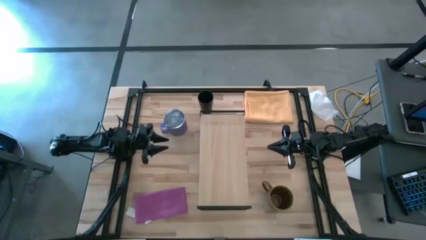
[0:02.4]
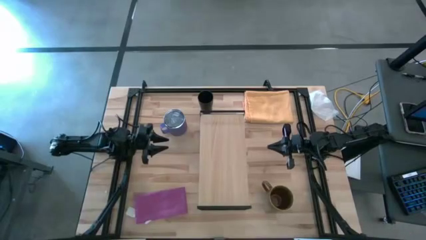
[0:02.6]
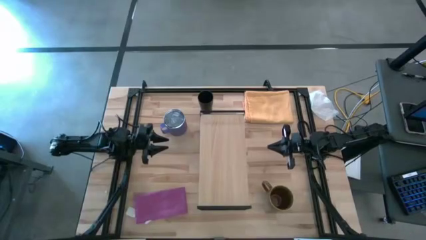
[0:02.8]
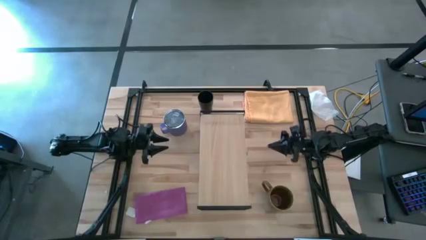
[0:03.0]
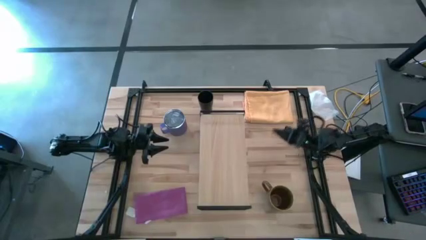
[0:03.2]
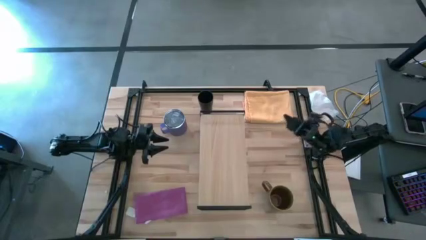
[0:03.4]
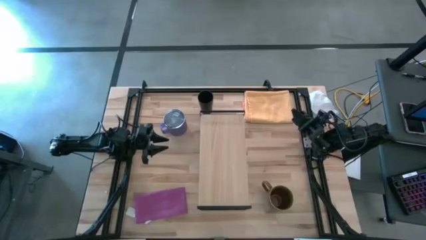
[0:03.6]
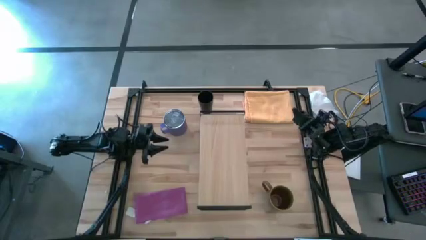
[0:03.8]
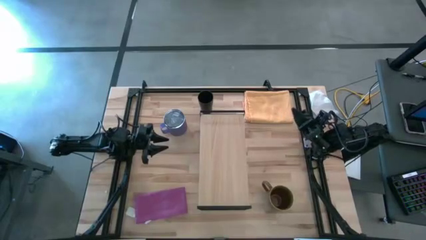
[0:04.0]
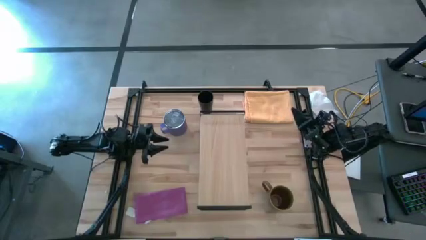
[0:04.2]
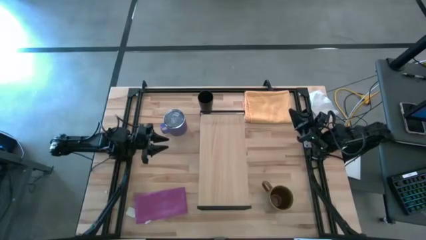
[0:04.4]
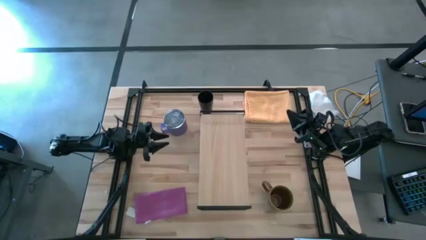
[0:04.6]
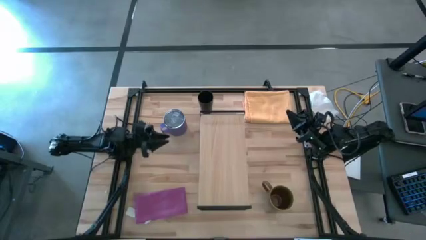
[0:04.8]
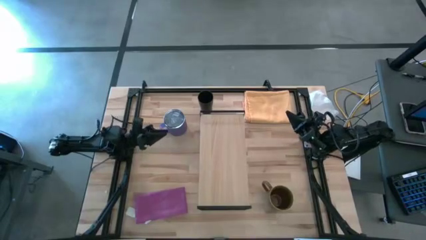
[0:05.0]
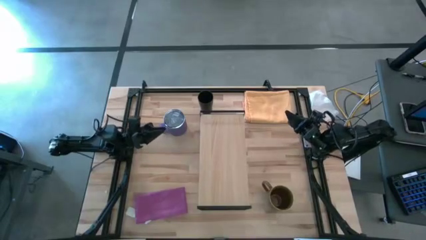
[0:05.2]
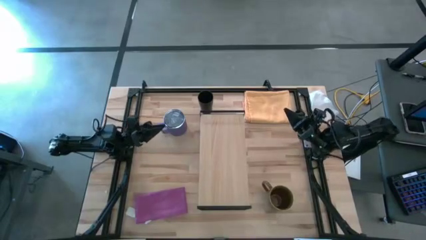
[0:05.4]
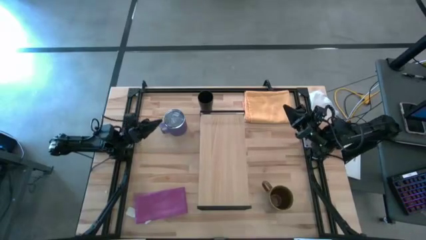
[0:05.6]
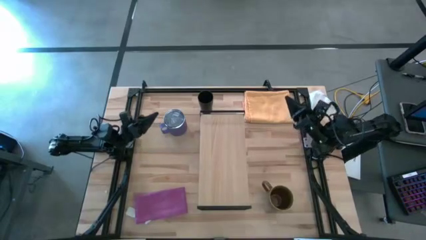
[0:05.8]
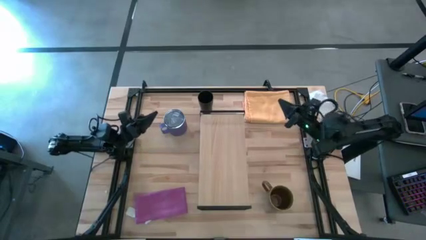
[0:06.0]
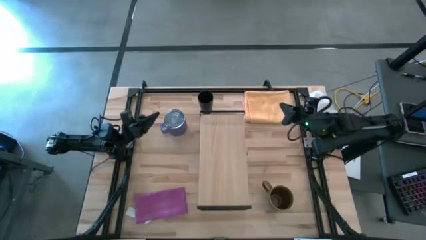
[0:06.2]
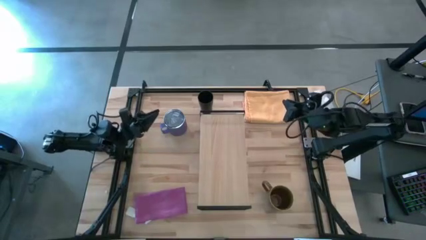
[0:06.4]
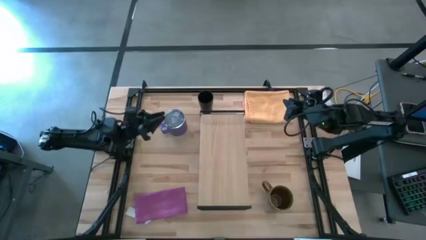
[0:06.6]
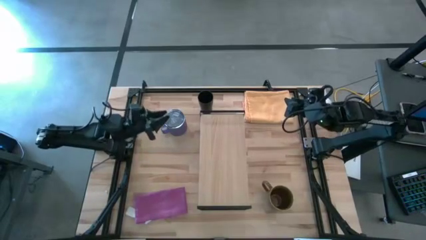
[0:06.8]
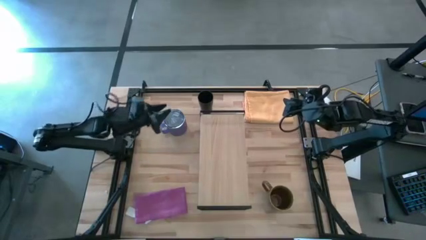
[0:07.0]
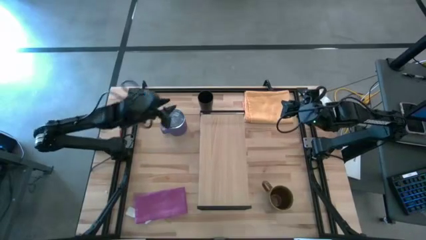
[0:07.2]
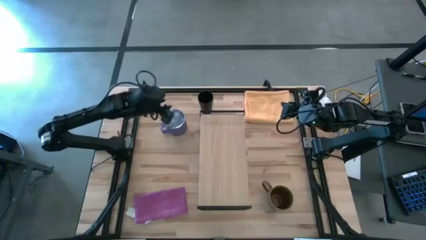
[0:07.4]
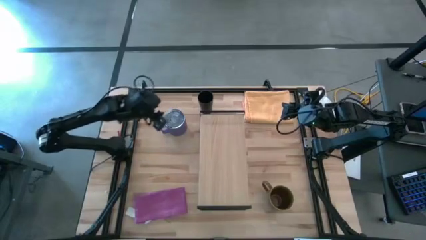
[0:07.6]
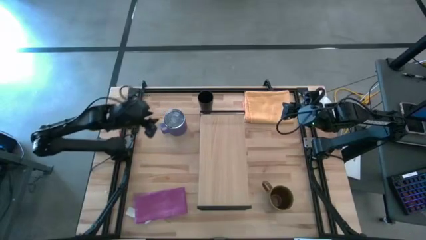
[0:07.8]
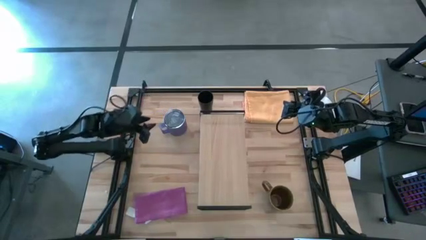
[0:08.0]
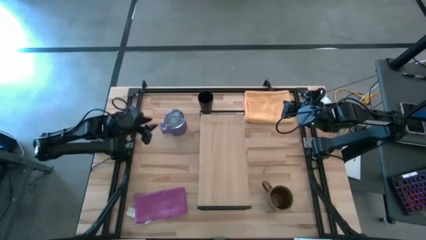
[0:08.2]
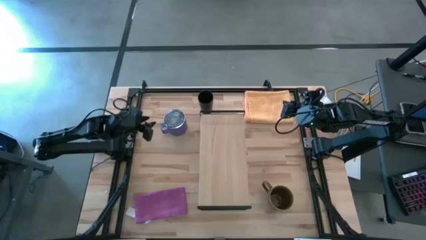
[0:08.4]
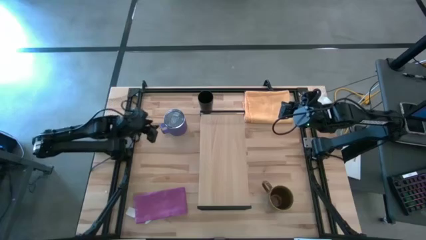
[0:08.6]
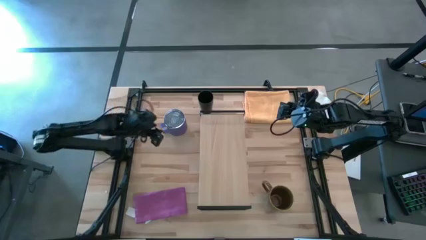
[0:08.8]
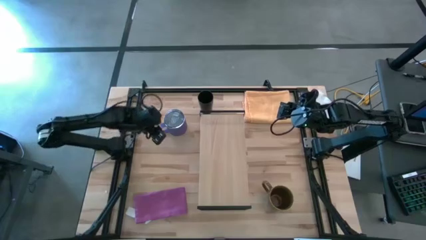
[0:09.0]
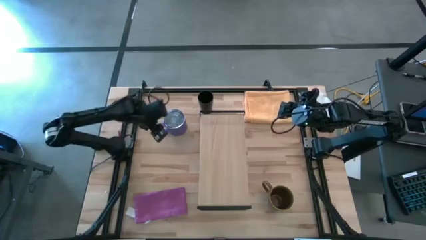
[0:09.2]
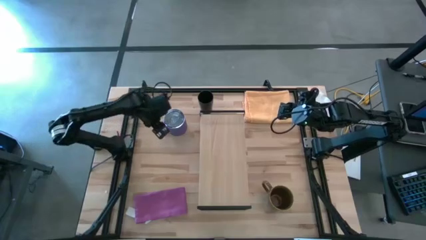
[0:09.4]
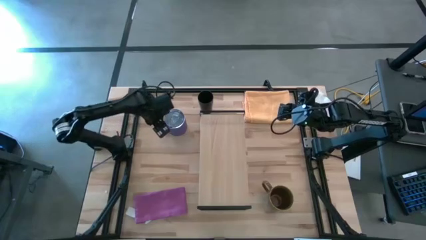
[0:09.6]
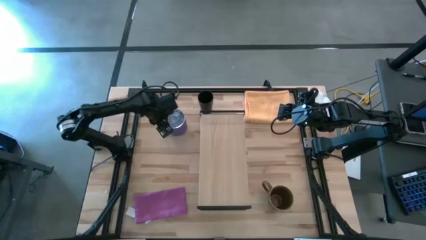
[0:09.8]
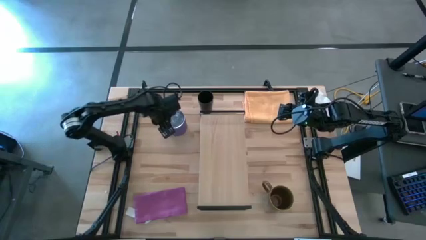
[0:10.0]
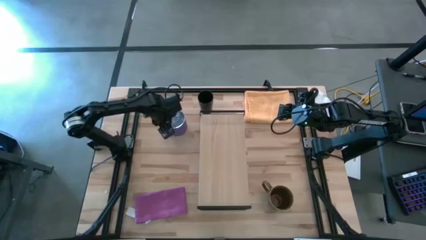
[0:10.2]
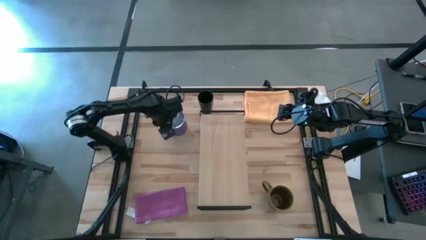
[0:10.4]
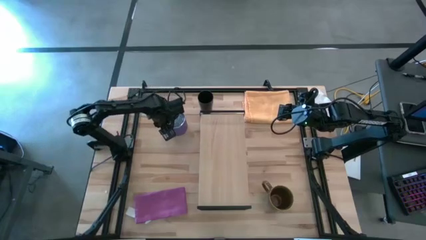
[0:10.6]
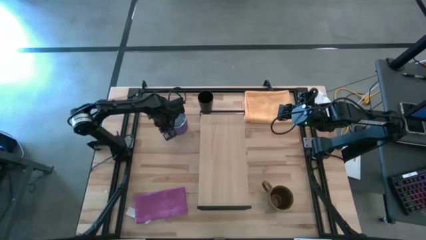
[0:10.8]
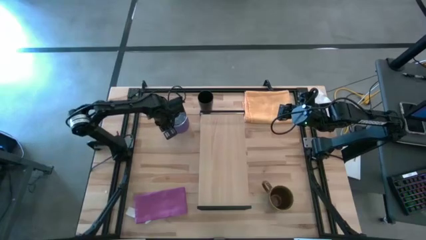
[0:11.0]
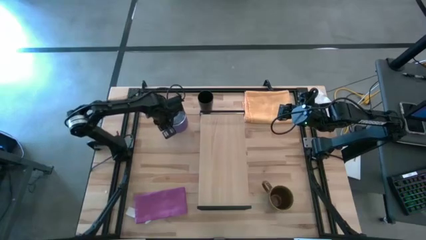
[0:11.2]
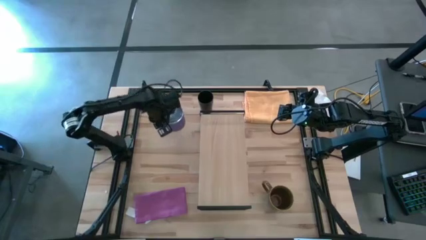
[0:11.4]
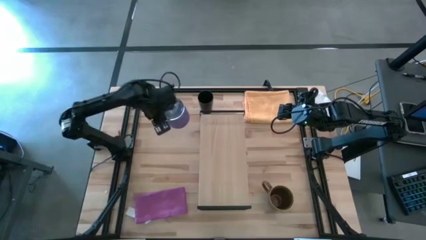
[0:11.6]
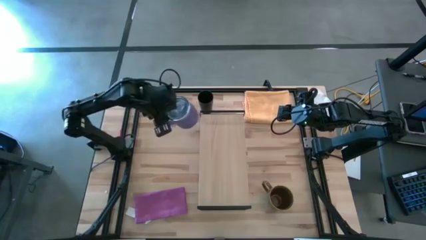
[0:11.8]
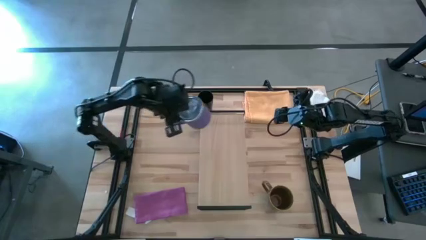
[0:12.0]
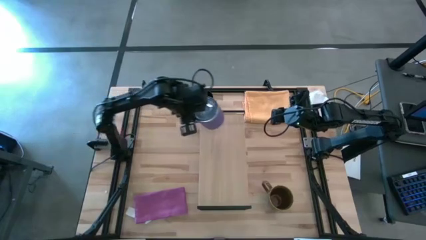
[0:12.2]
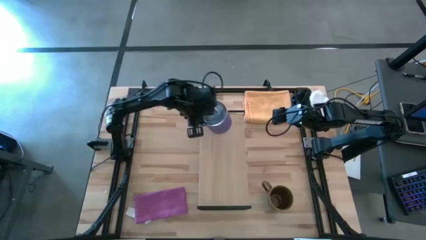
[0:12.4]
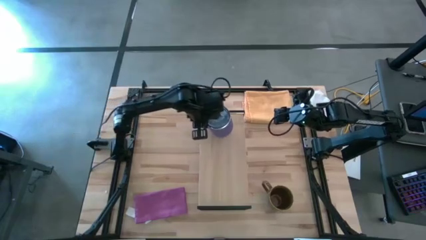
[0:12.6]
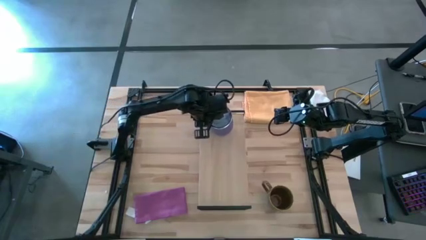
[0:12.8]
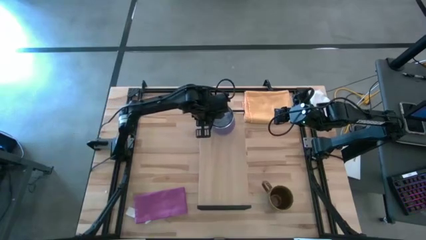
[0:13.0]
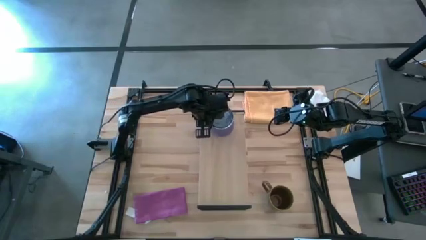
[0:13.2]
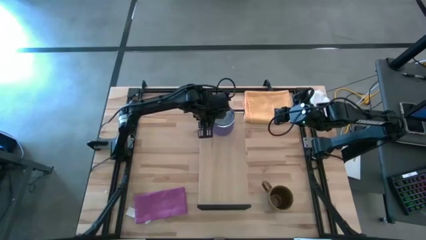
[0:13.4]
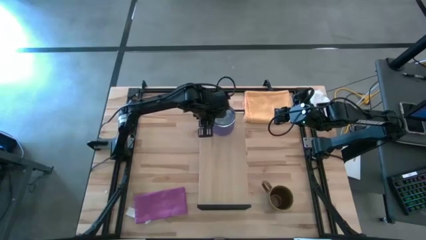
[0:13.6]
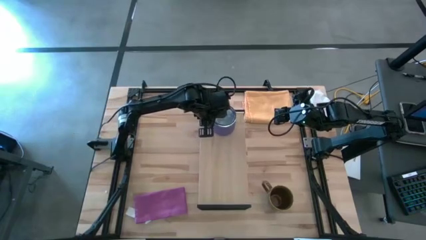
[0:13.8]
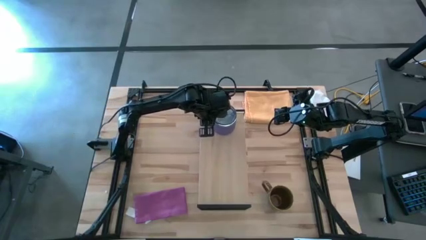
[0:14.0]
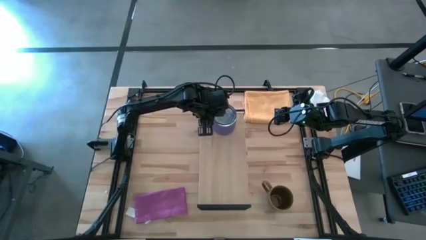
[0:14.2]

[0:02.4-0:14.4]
Task: Stack small to large cups/mugs on shelf
Put the violet mug on the shelf
